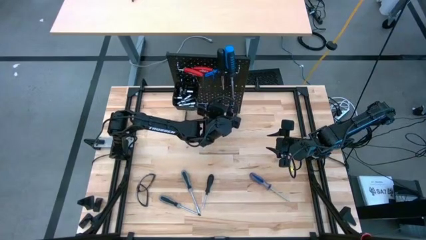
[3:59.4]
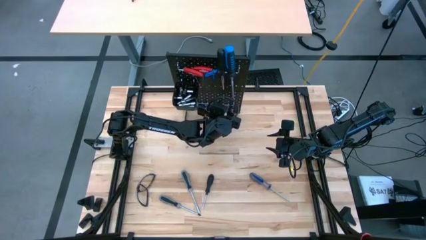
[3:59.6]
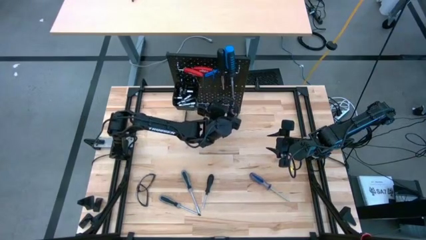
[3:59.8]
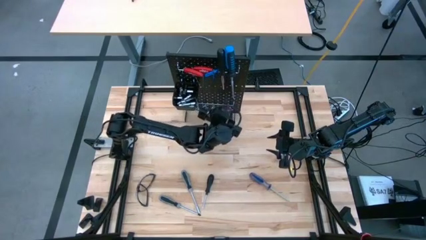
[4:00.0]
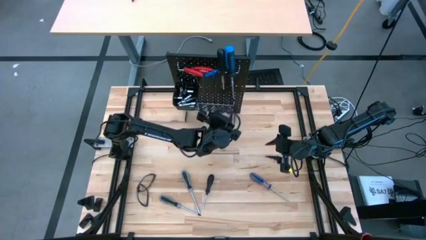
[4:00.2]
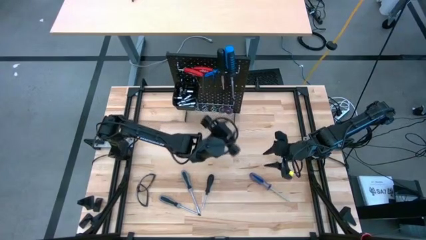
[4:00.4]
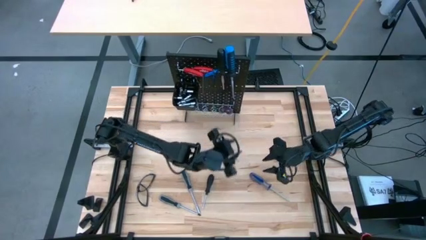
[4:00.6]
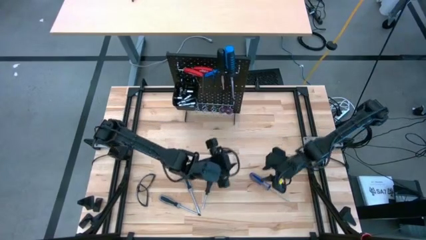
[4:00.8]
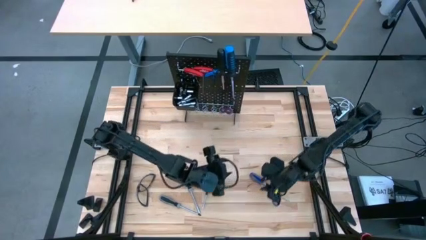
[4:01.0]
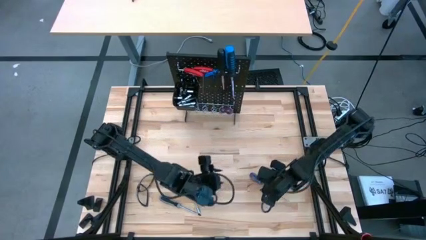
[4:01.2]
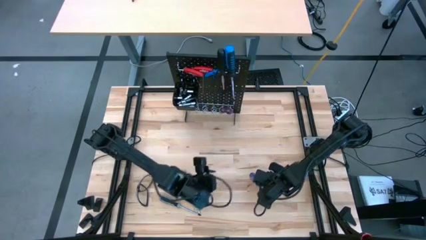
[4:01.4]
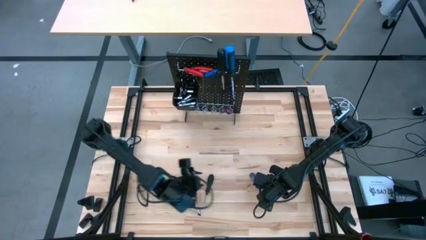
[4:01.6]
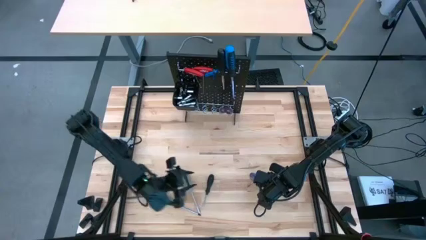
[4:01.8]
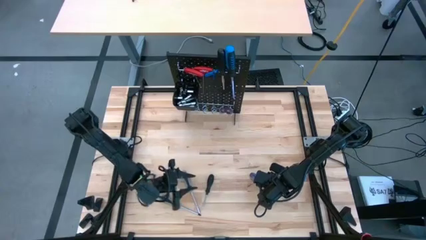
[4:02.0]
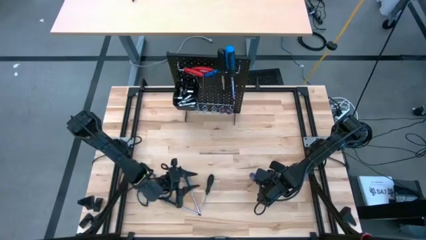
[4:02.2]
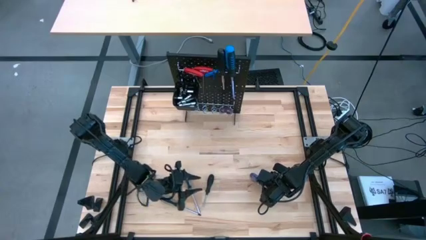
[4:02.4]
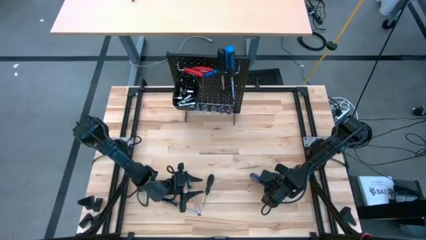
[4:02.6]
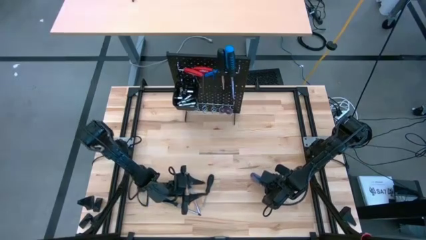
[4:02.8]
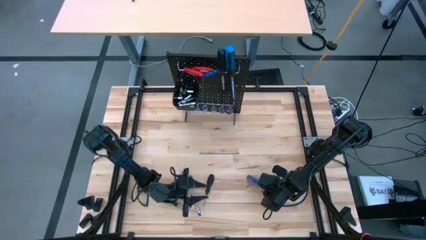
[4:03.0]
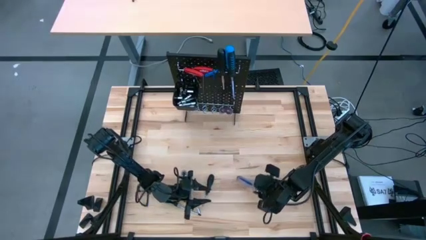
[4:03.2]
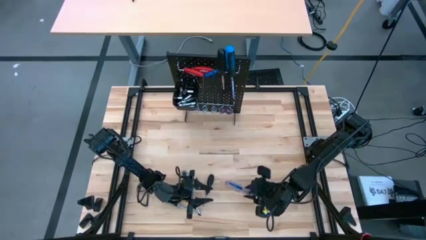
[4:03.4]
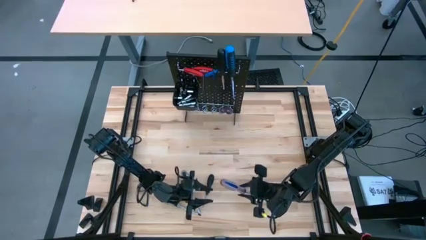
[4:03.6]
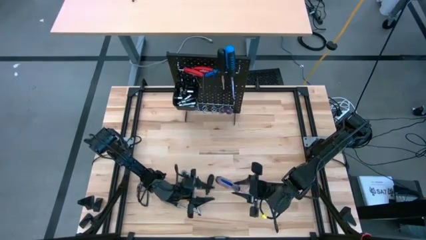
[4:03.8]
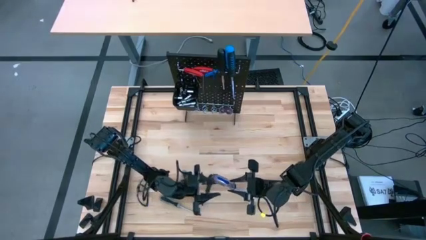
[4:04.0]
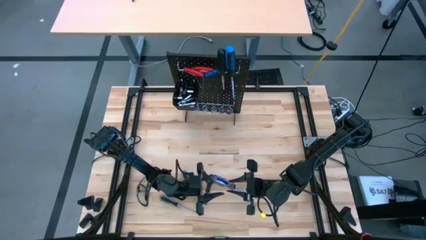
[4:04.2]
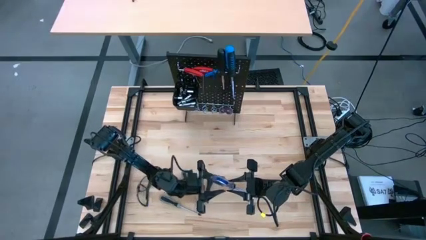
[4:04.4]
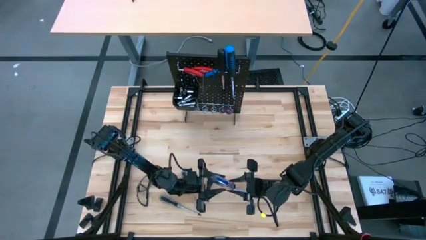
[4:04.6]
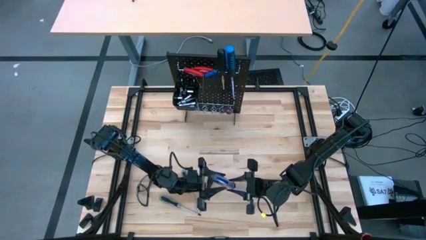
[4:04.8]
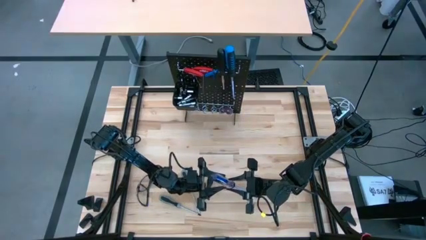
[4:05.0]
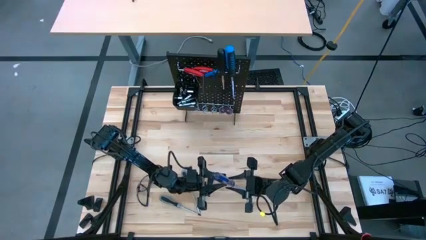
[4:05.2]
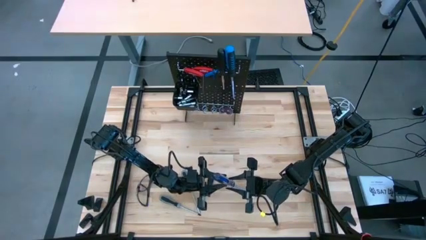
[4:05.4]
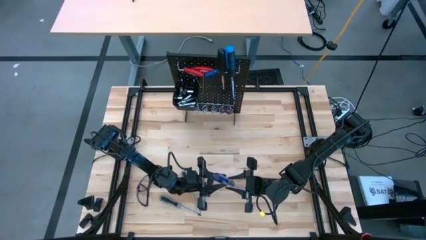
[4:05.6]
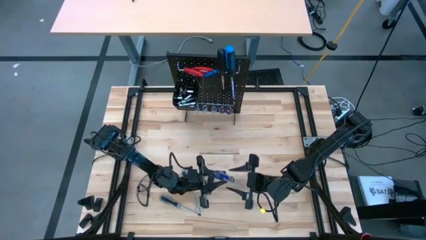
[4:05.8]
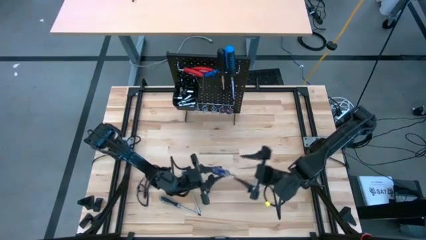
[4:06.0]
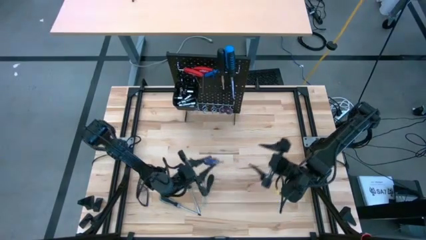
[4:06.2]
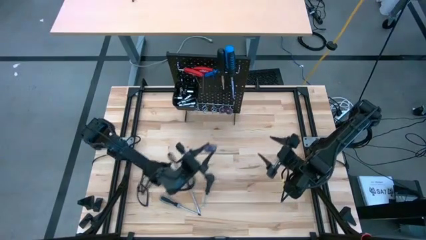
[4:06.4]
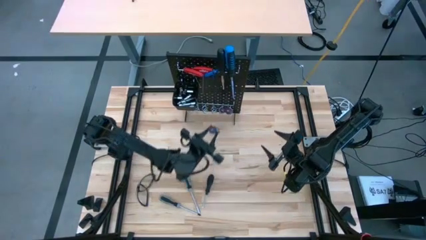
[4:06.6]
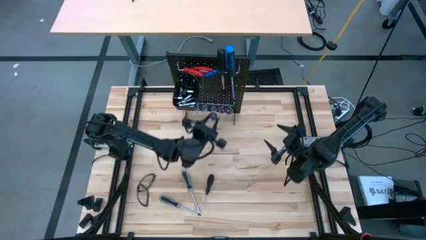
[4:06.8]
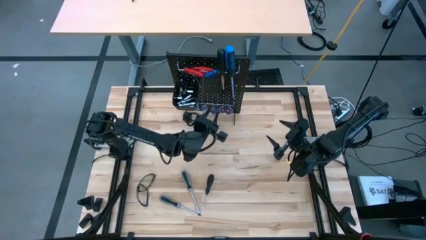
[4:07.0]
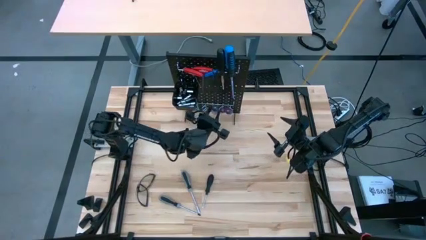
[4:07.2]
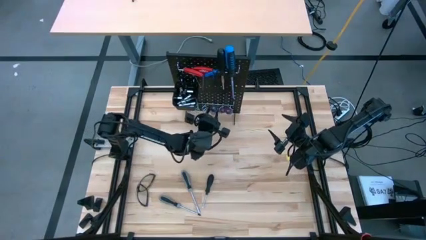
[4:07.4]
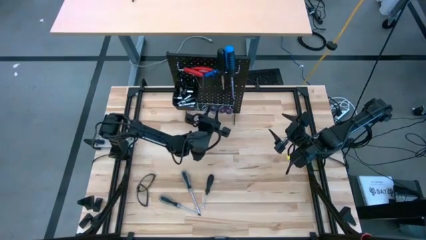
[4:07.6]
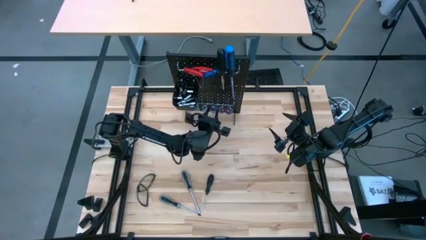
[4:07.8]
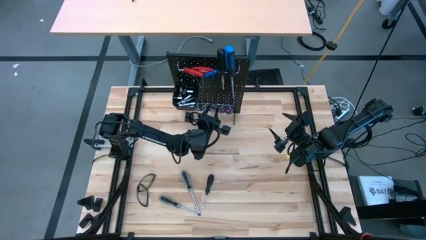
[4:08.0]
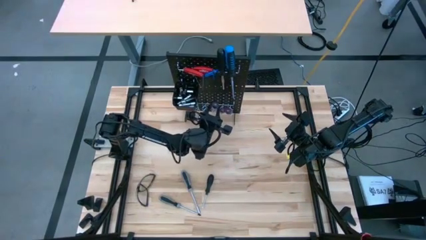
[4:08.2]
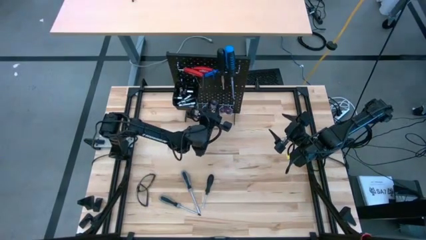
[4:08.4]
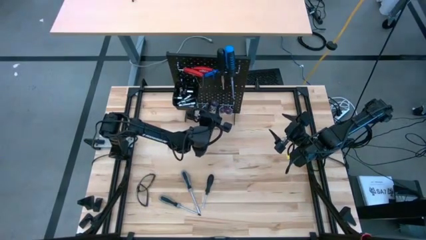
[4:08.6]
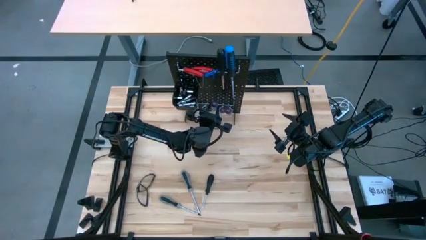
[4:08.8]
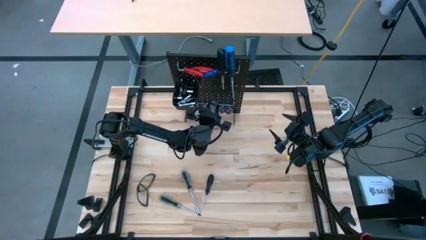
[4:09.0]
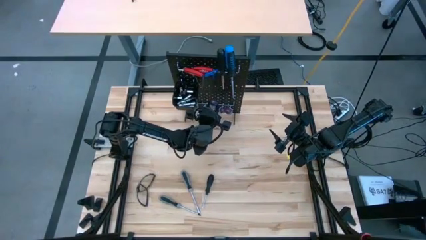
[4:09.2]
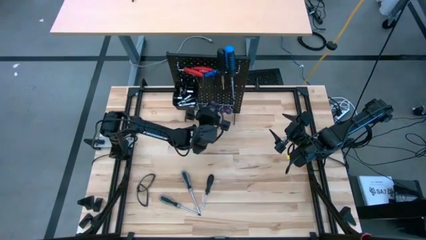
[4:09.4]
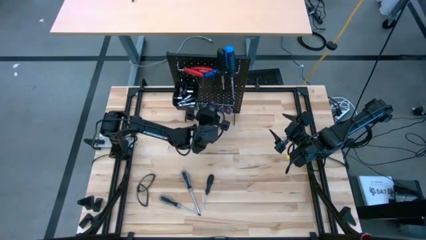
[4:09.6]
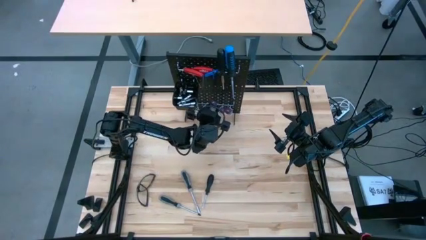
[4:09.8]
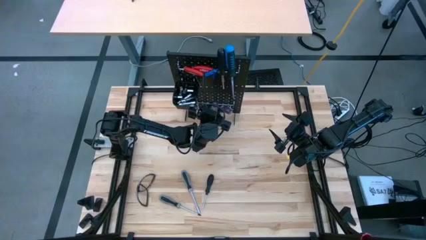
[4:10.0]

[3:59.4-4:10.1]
Task: Hang tools onto peg board
Hang the transparent blue screwdriver on the pegboard

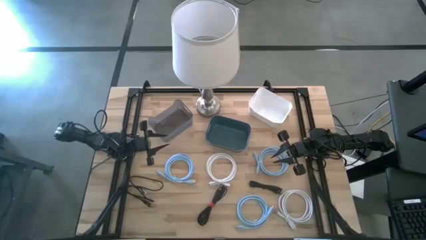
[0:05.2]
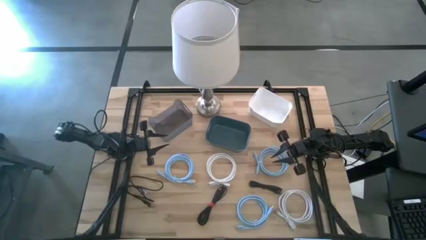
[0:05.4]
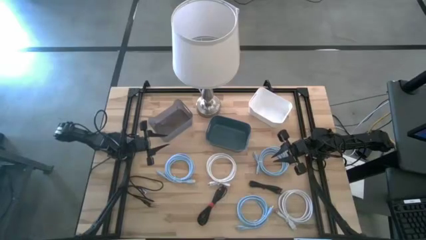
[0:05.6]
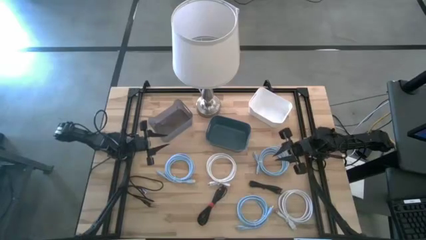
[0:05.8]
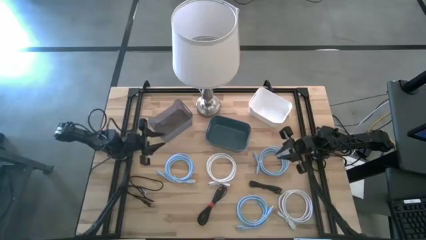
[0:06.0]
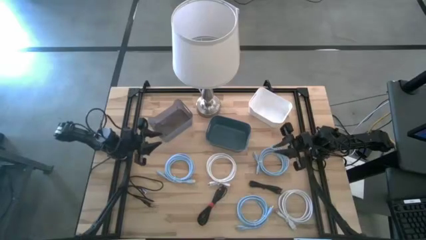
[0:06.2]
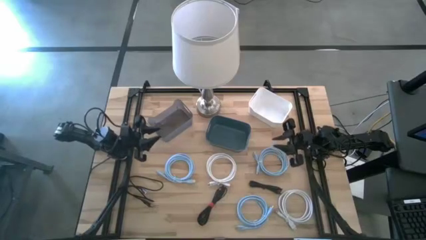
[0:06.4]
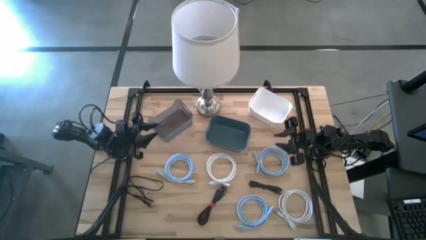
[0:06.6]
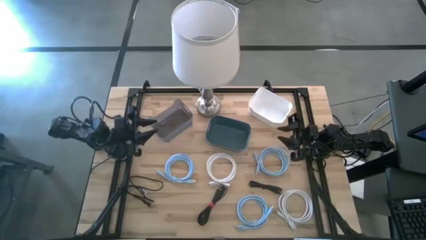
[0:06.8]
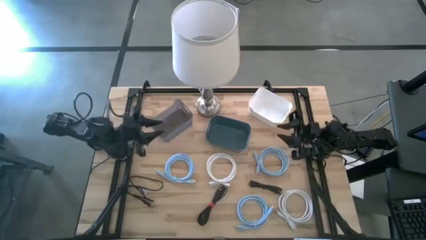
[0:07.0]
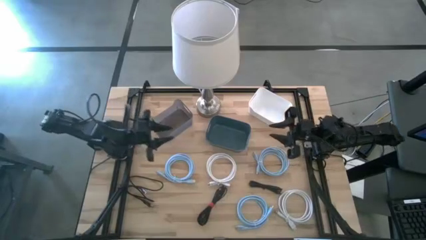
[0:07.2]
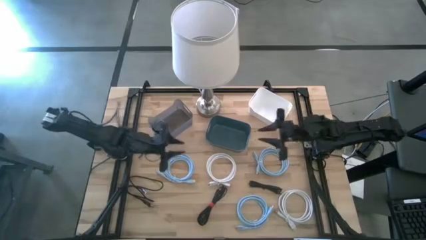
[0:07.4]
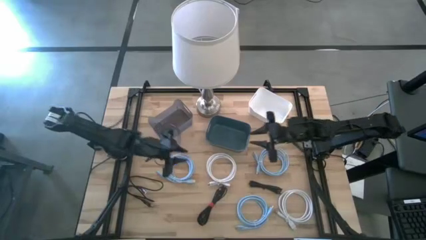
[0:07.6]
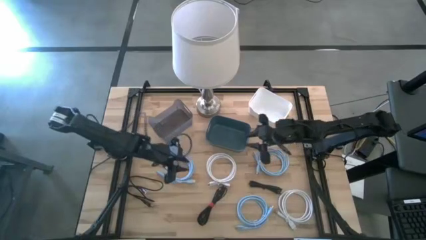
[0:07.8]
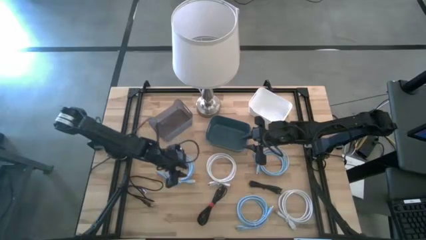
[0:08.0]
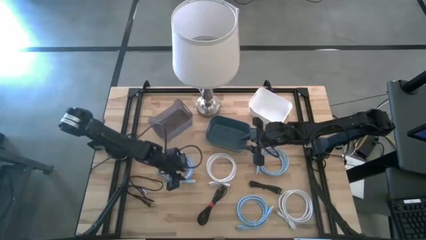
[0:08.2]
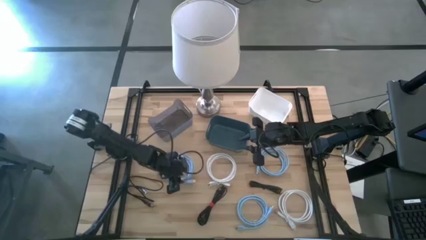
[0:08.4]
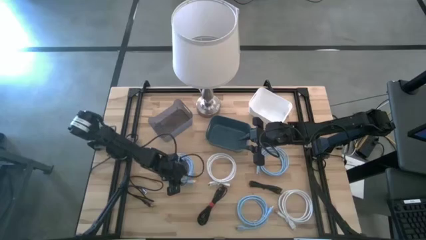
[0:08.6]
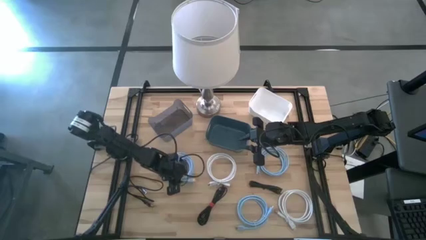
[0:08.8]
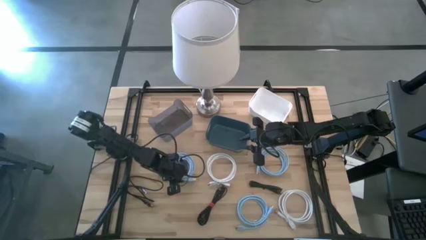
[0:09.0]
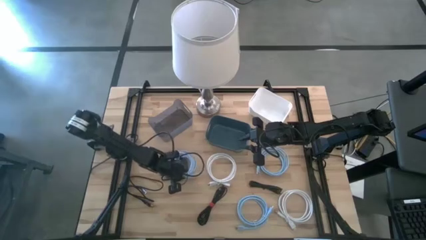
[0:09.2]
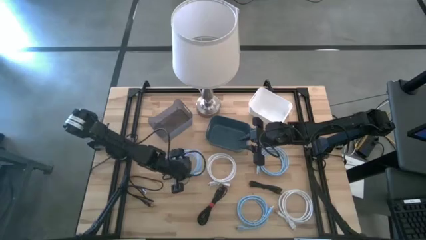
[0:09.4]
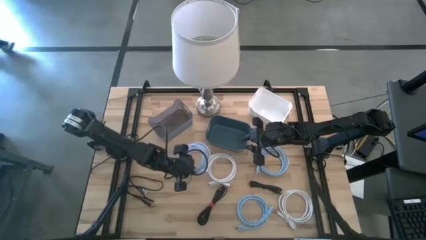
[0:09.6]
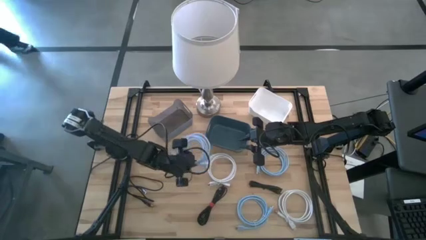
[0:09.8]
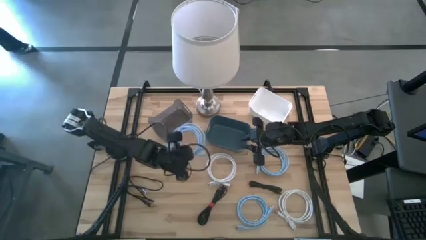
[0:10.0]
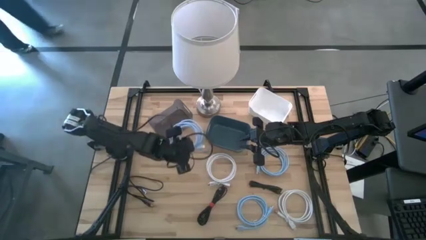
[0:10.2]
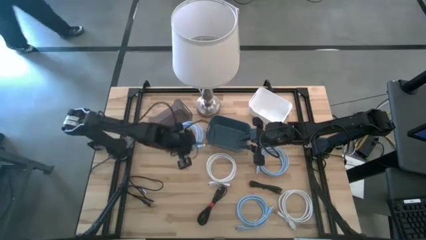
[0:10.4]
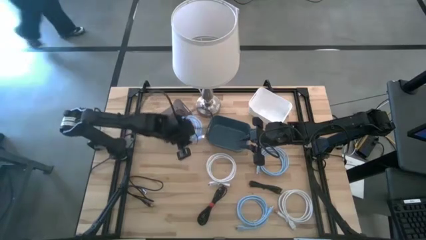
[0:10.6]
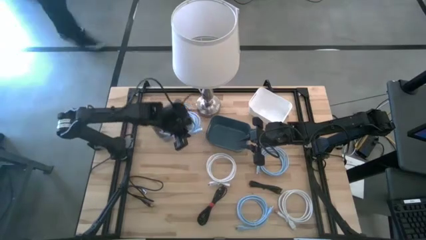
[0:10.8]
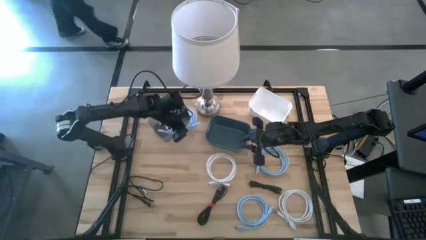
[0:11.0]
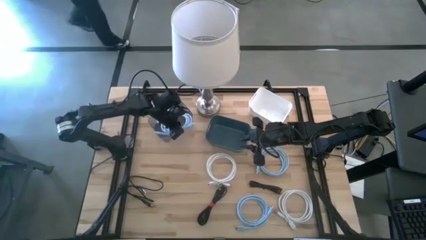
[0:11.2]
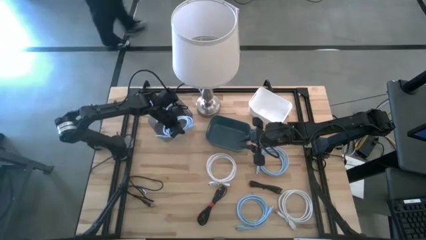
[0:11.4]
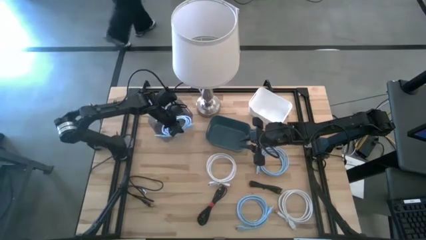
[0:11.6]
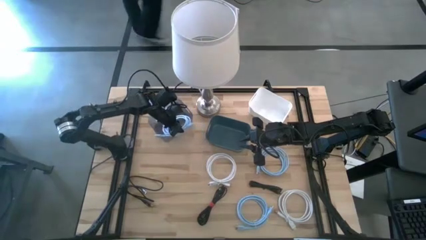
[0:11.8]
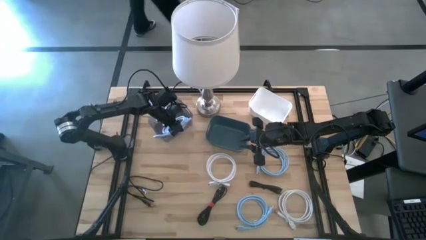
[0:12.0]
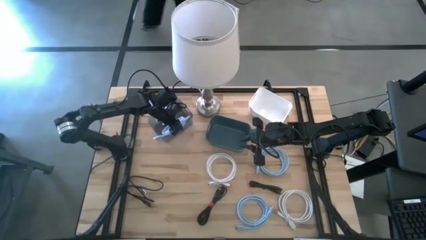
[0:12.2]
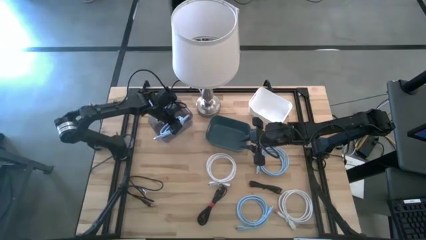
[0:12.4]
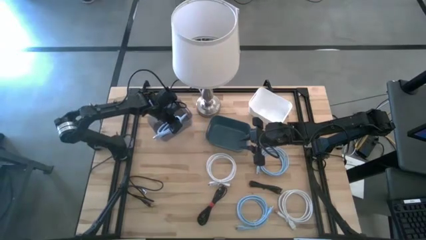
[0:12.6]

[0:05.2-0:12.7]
Task: Pick & Place USB Port
Put the top left blue hdmi cable into the black bin
